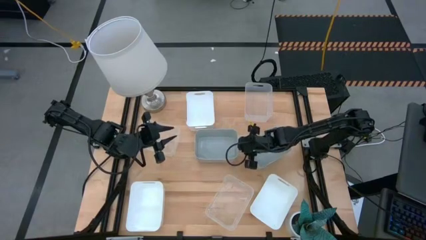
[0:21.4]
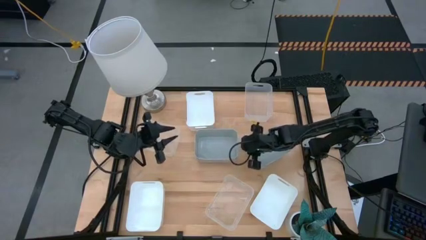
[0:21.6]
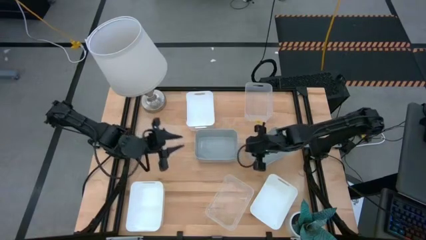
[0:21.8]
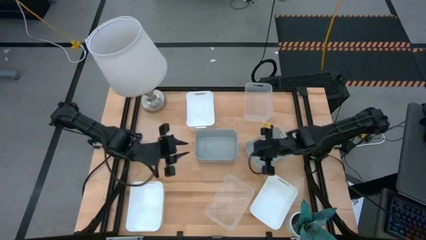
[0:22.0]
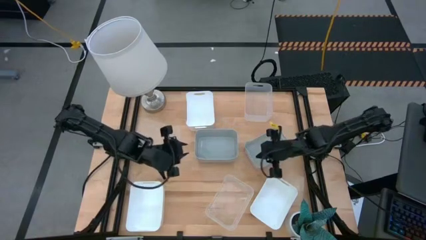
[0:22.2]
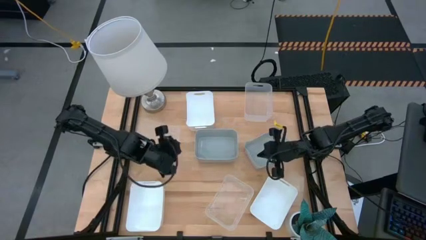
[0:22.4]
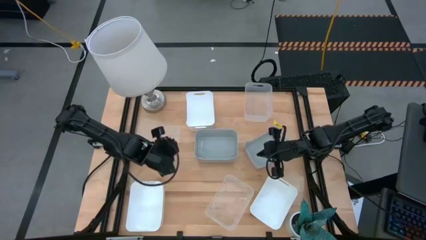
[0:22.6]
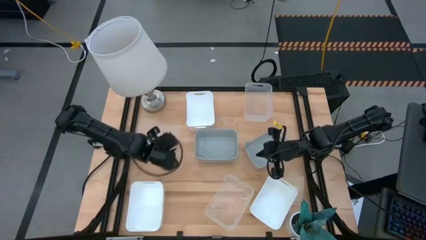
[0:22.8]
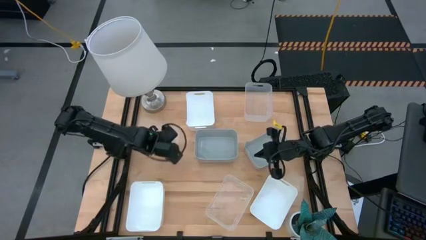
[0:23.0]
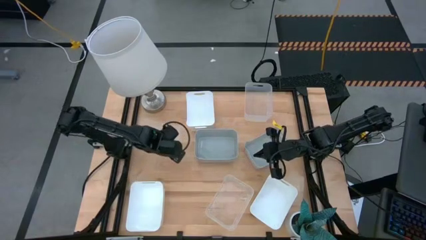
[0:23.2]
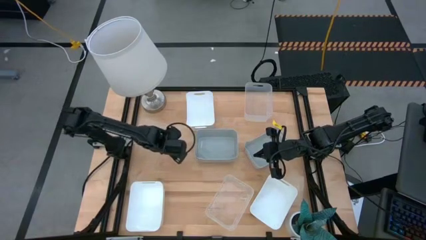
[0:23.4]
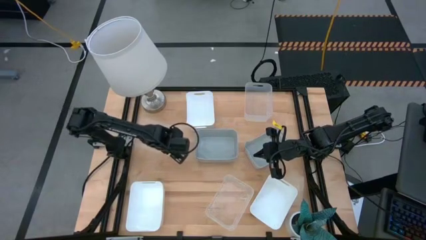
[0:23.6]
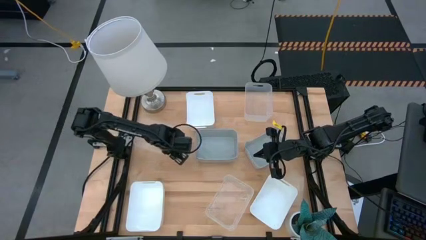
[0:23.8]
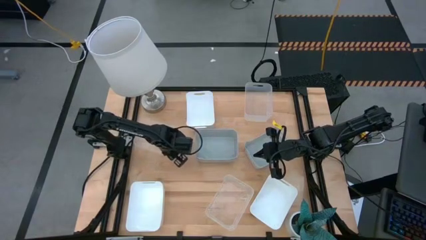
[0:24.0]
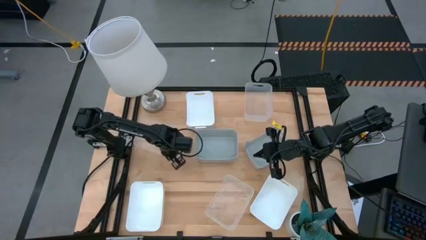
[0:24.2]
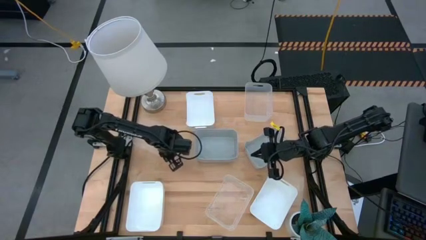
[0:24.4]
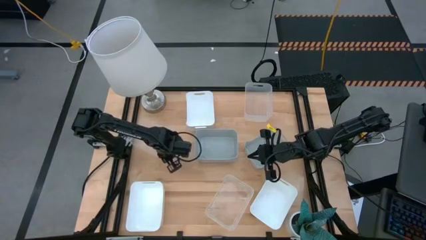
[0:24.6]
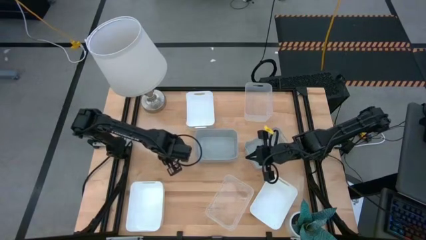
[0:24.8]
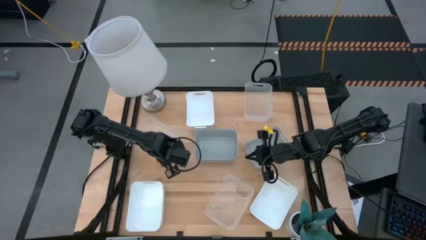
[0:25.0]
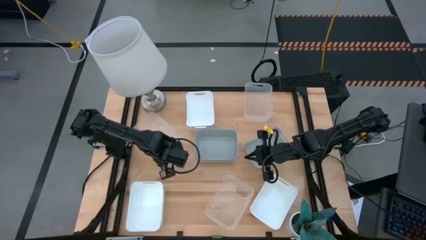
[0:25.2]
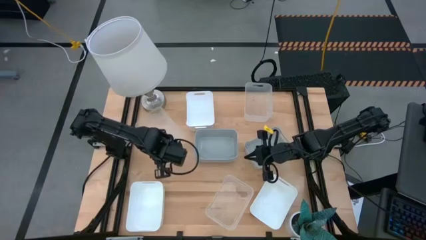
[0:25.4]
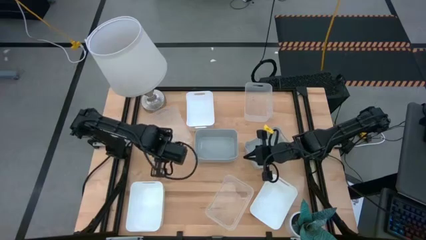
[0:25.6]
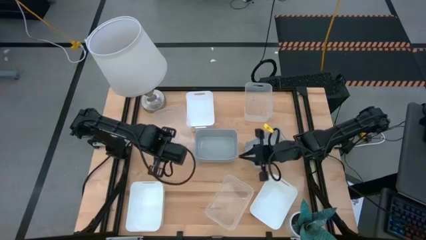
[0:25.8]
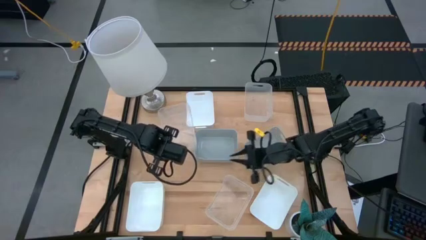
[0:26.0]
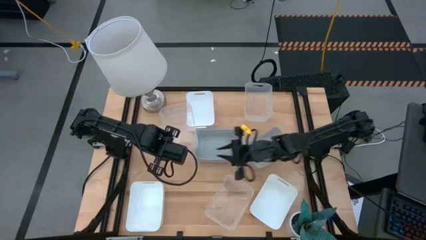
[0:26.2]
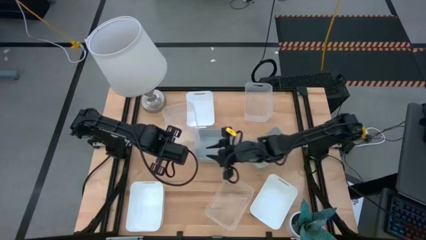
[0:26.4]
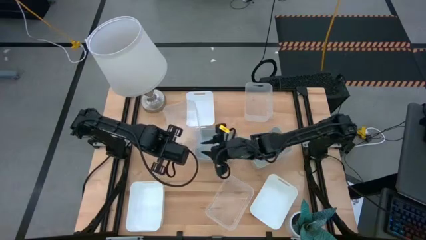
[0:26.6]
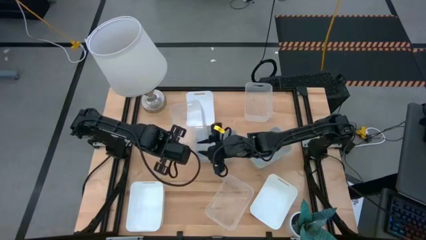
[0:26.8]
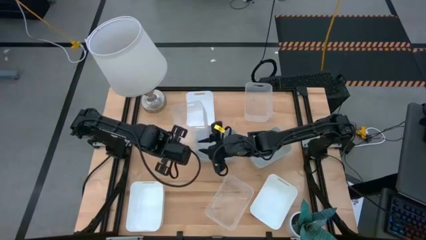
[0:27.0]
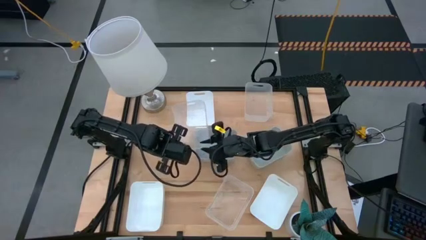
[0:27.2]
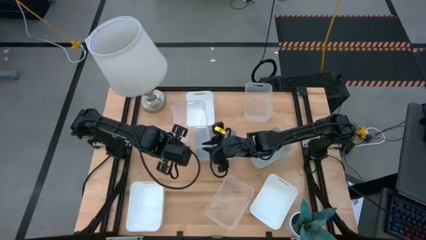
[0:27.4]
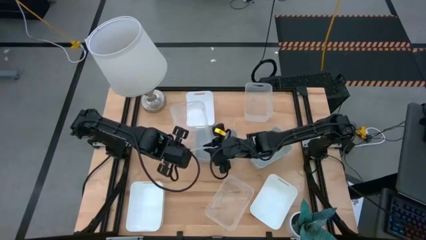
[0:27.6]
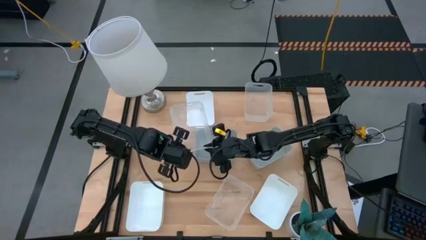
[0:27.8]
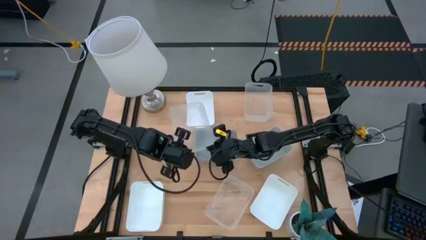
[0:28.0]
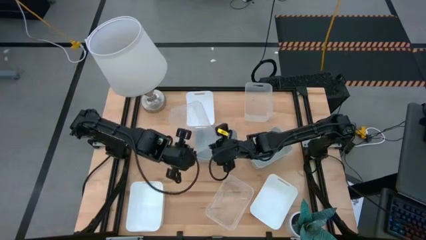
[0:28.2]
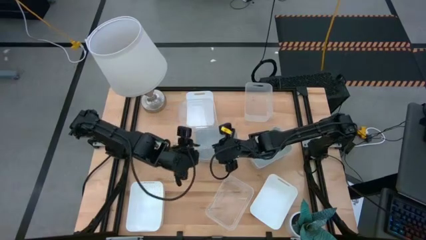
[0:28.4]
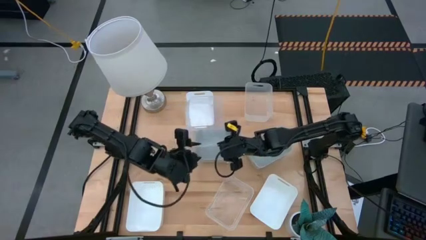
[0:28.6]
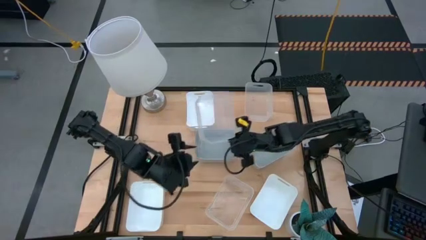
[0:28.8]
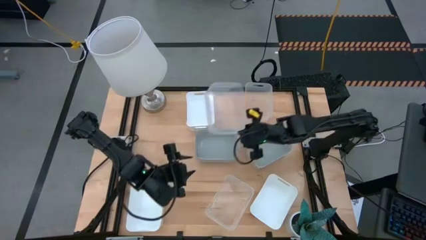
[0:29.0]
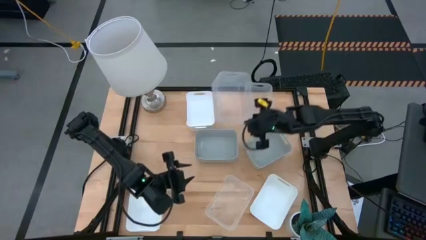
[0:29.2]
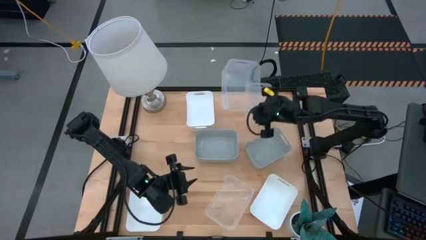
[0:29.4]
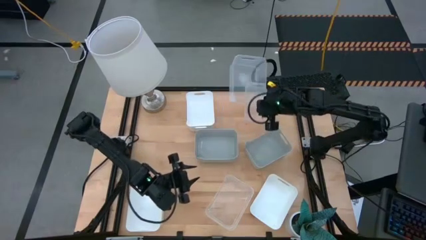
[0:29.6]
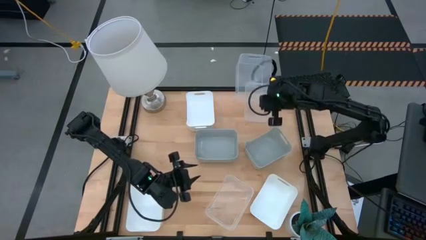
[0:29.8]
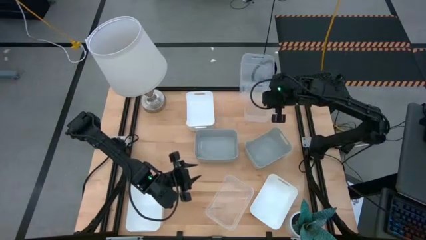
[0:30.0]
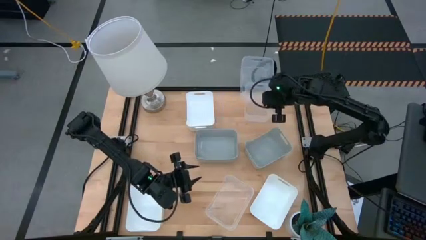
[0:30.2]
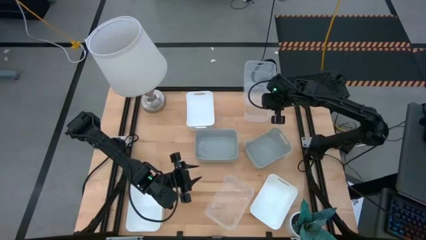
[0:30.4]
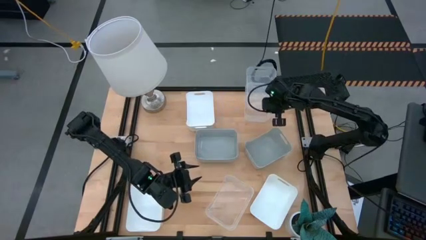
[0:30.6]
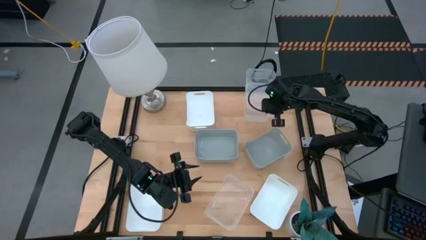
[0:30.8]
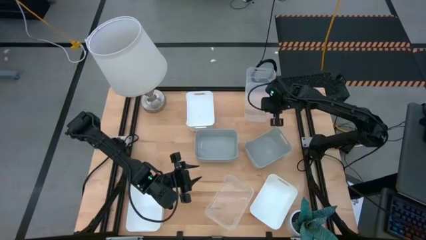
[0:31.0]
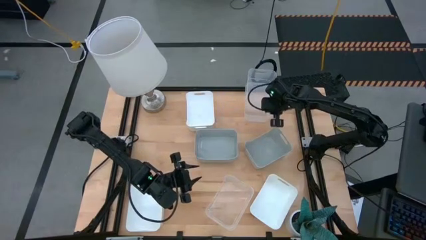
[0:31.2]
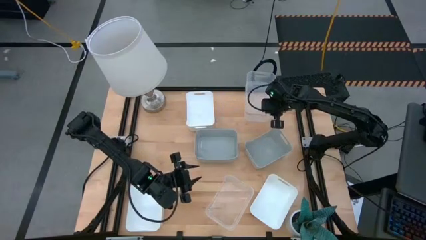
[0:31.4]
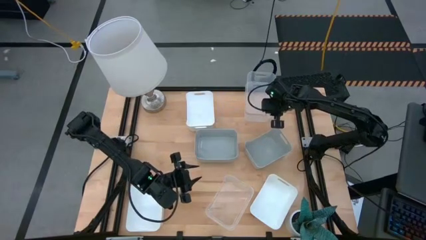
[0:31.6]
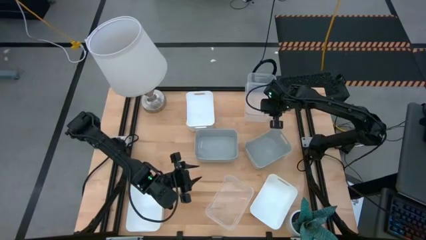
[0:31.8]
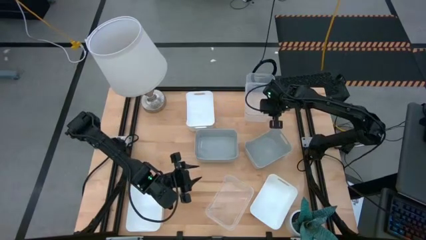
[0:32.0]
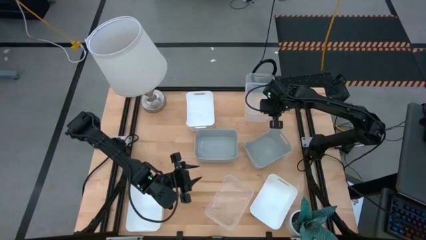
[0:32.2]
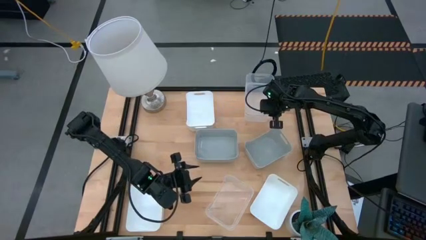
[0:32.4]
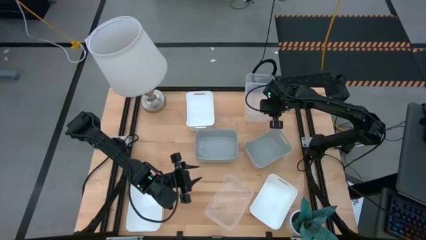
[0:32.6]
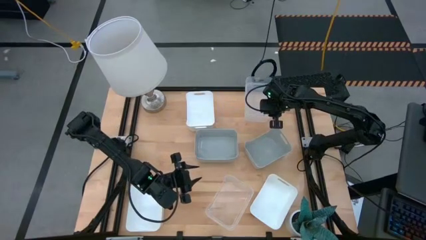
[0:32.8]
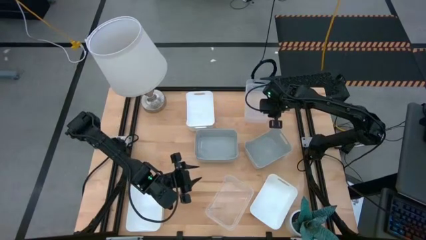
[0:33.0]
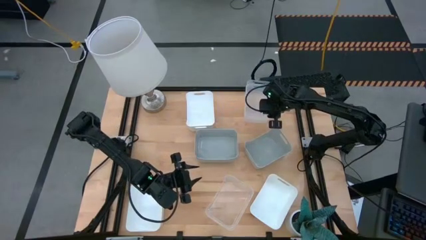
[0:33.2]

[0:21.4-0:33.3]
Stack the middle left transparent bin on the top transparent bin
